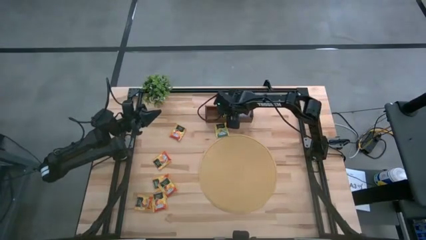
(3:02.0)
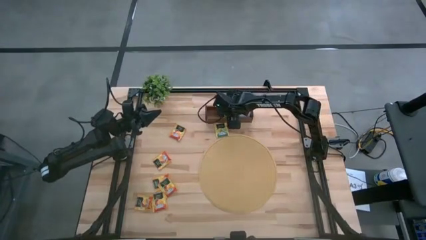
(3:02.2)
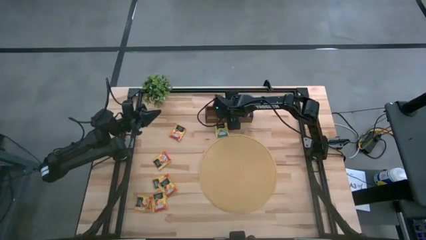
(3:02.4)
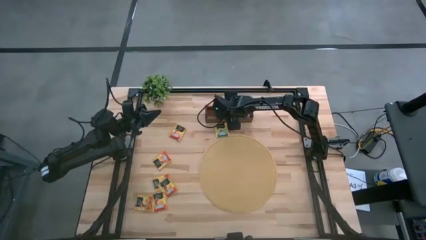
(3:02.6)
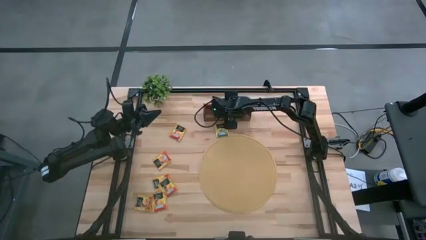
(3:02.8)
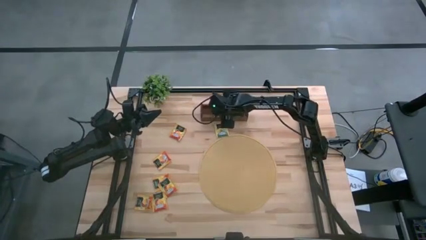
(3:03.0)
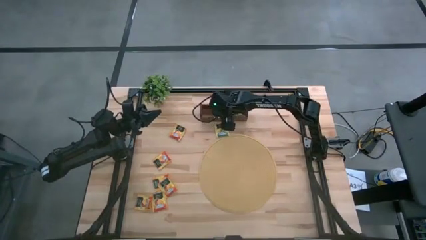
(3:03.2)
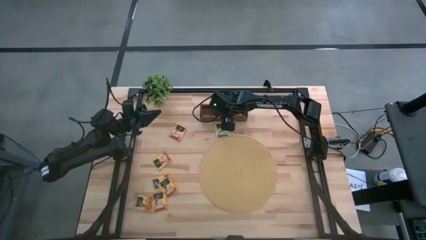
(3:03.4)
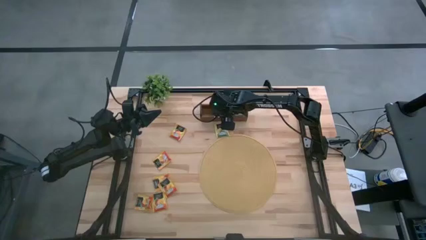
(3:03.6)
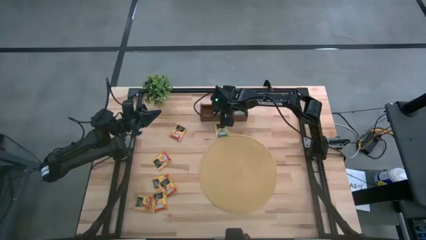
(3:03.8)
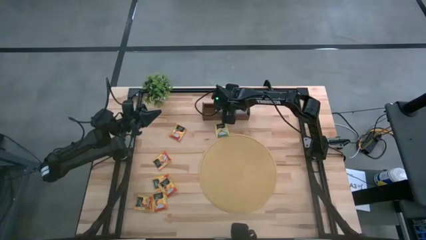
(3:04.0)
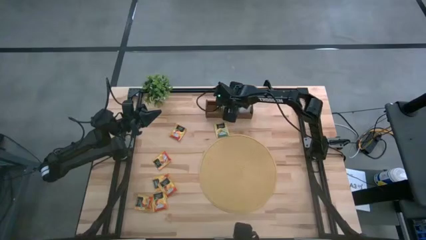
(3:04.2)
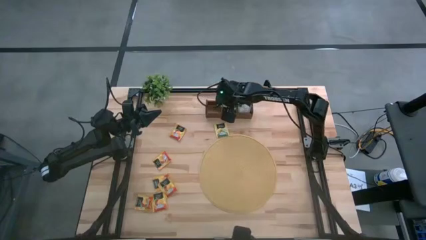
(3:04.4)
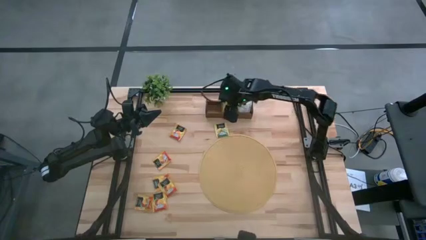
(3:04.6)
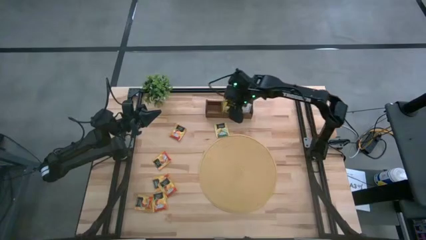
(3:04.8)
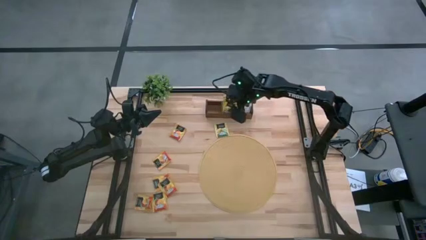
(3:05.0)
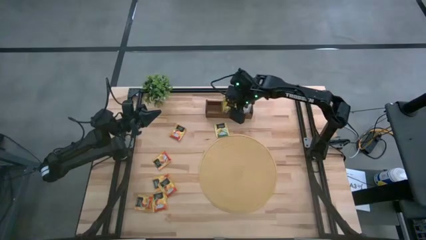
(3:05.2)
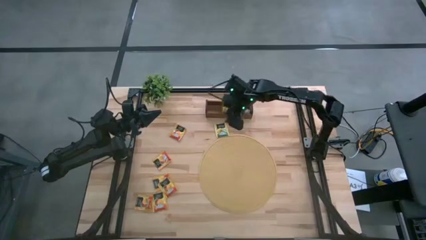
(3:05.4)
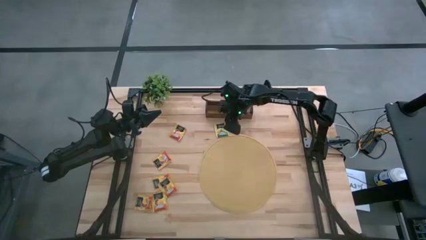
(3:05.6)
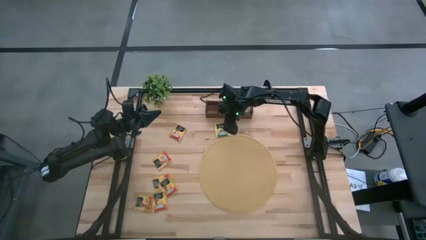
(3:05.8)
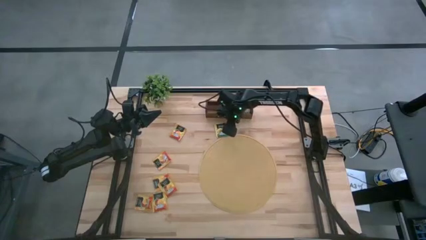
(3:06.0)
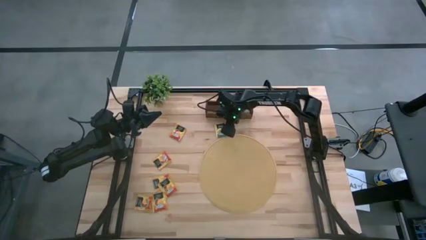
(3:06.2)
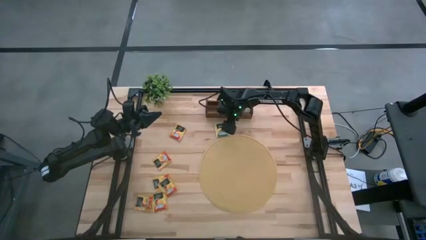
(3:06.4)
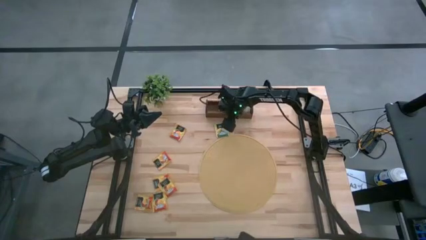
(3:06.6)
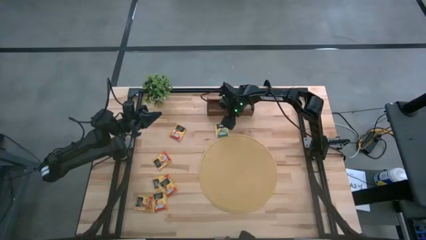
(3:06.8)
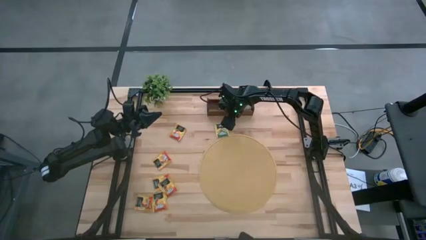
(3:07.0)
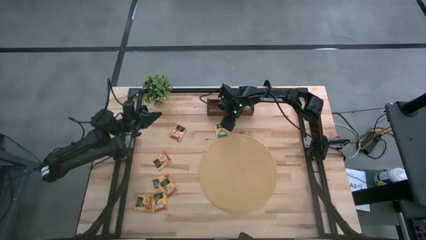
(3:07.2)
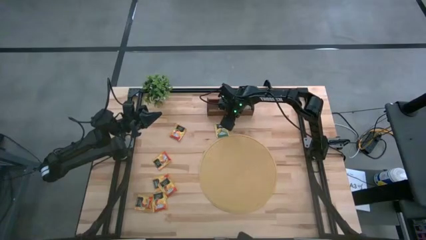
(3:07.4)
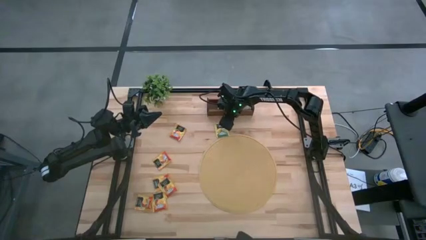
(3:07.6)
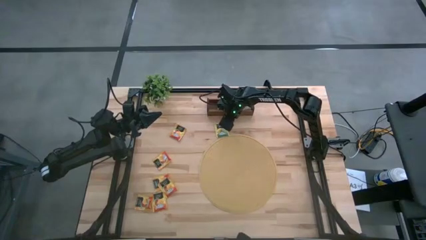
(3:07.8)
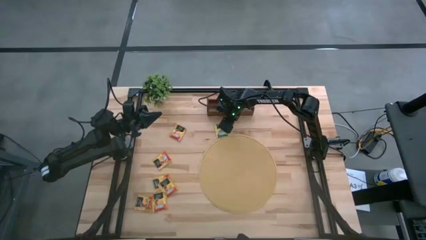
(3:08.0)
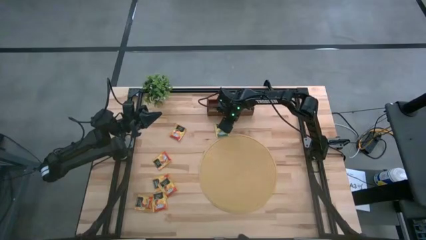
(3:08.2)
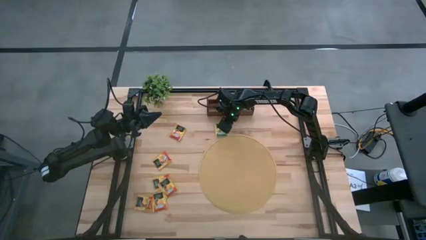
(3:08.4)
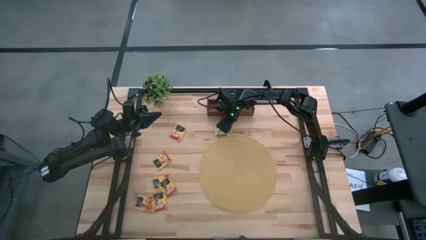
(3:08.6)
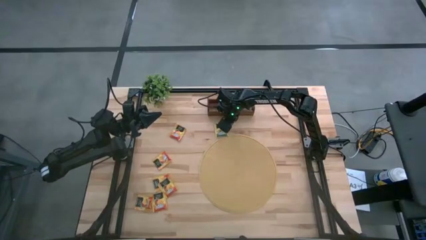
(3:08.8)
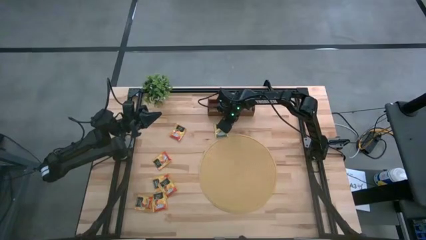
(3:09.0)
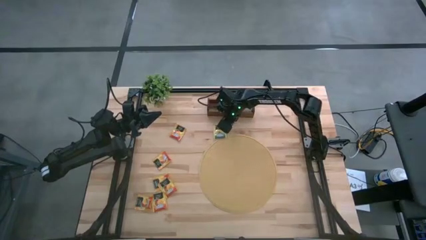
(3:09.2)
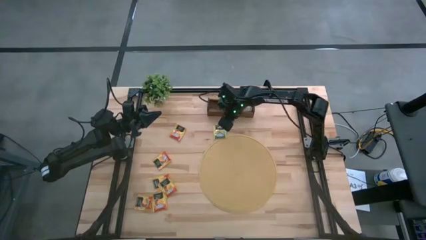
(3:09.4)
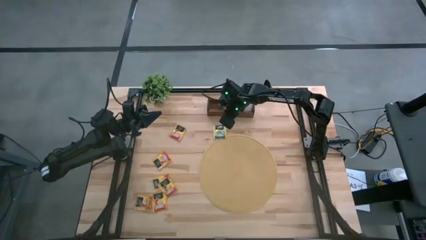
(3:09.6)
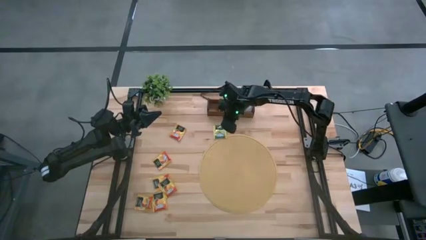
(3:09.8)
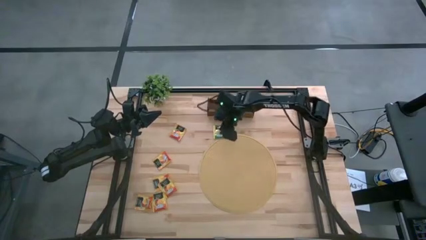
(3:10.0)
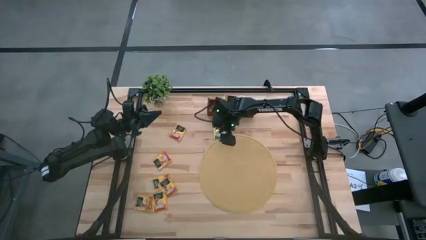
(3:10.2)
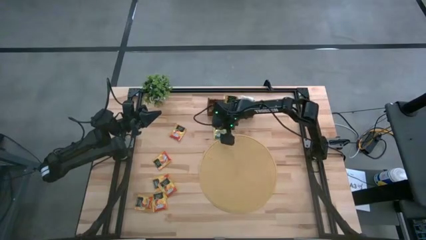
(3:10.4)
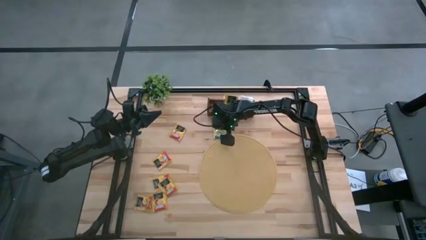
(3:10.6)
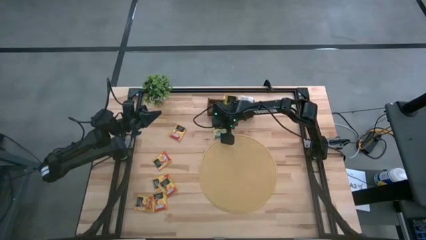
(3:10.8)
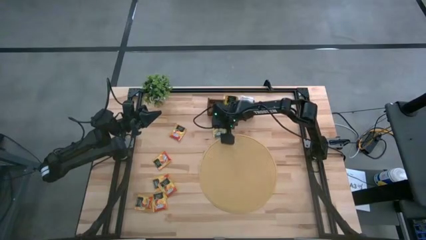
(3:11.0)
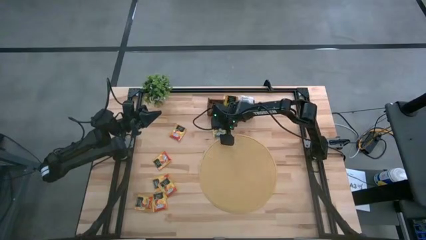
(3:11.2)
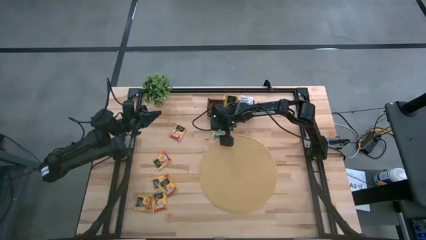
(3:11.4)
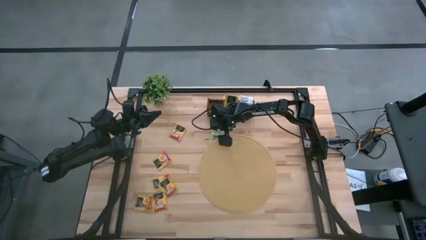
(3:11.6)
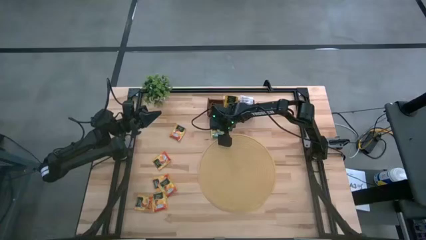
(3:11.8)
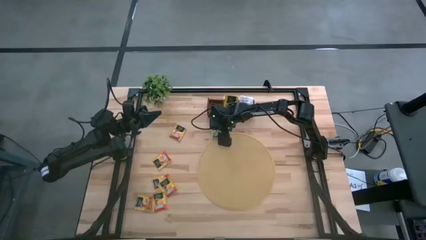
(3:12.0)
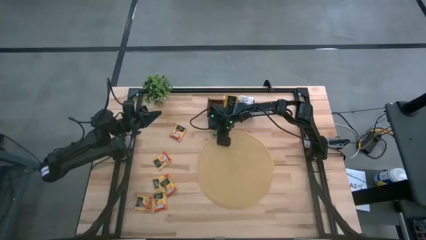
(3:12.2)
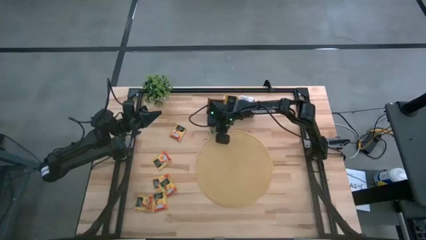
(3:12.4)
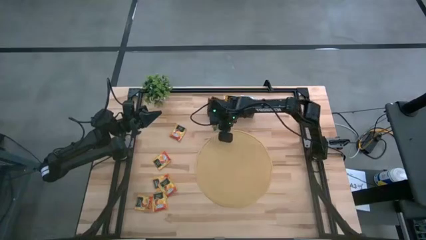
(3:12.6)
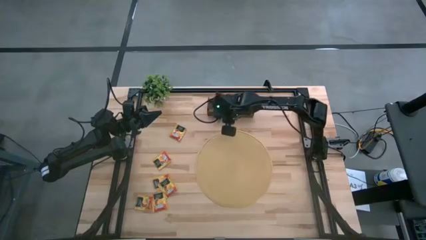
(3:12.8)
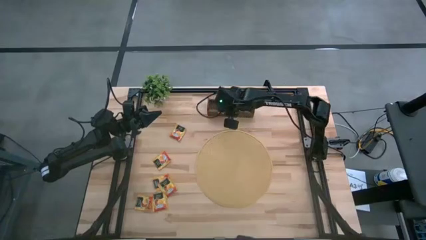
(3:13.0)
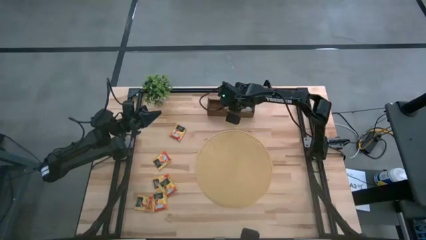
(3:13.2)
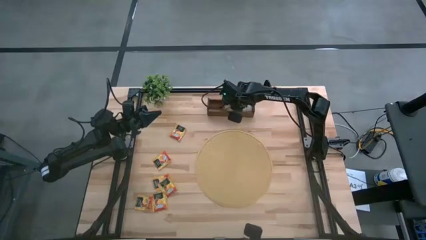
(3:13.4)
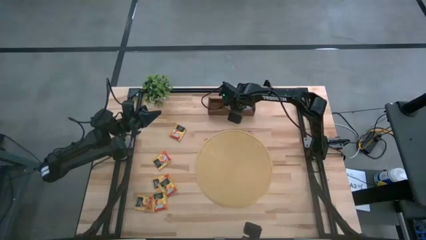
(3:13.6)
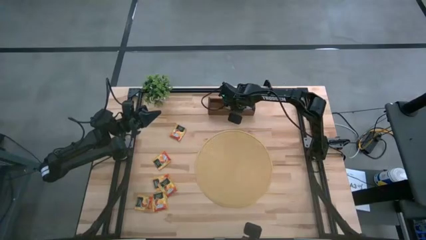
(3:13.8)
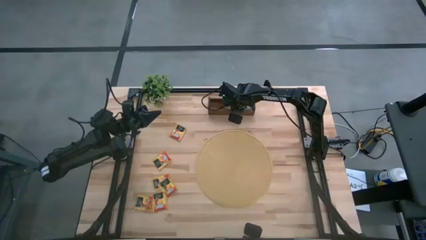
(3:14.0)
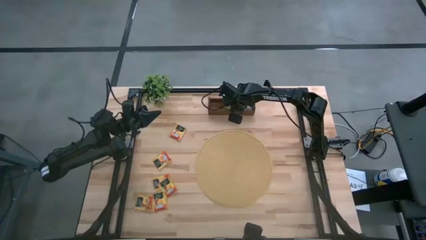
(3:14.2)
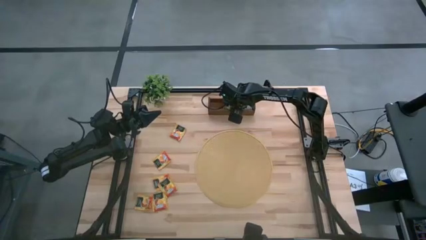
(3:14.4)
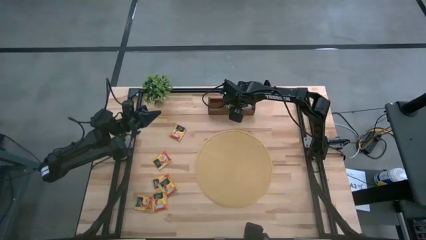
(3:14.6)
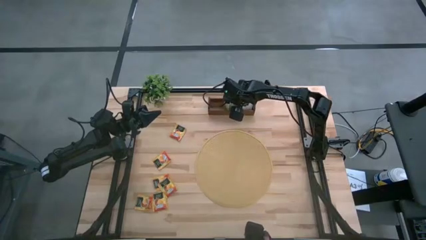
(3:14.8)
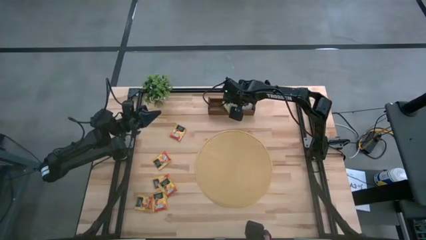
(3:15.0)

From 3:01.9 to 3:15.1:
Task: Pick & Place Tea
Put the yellow tea bag into the middle section of the wooden organizer
